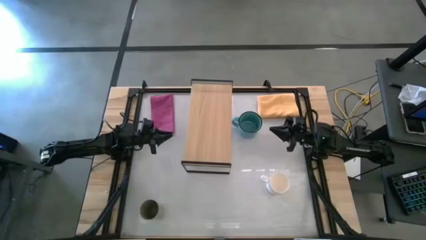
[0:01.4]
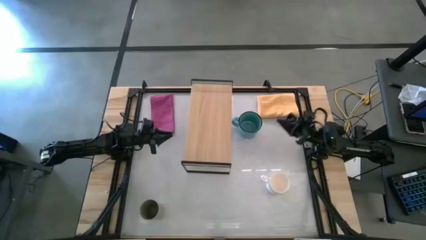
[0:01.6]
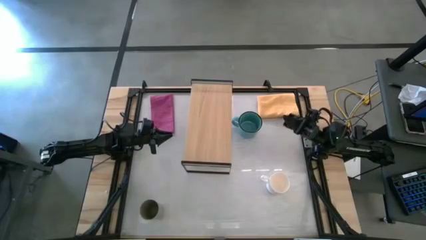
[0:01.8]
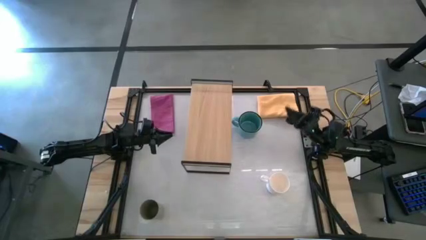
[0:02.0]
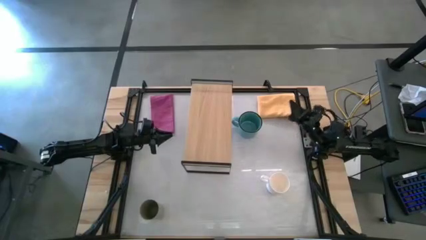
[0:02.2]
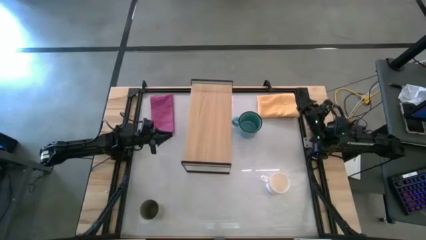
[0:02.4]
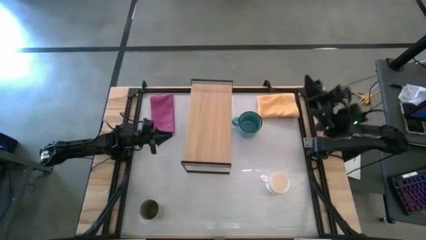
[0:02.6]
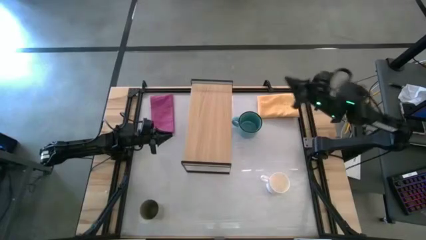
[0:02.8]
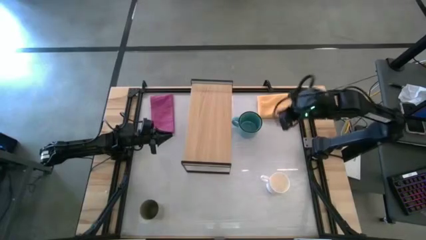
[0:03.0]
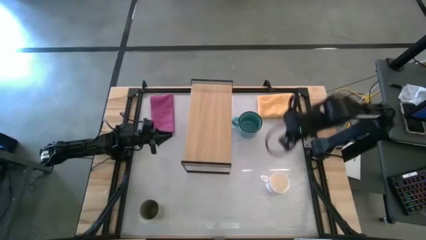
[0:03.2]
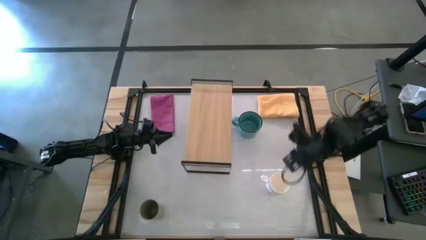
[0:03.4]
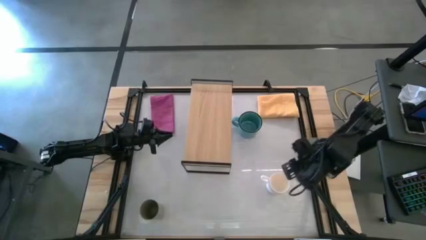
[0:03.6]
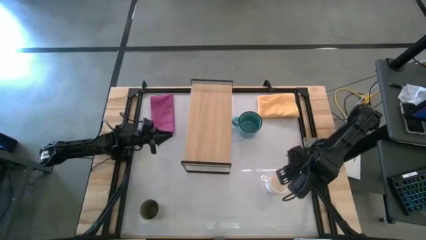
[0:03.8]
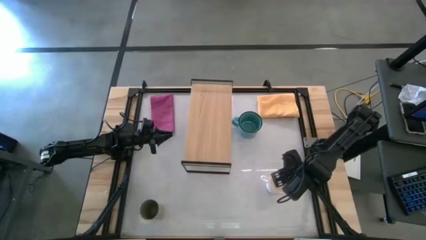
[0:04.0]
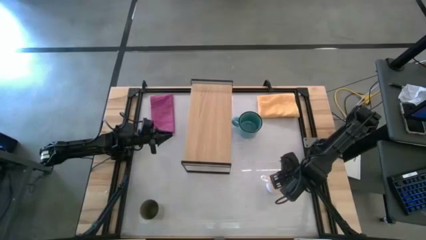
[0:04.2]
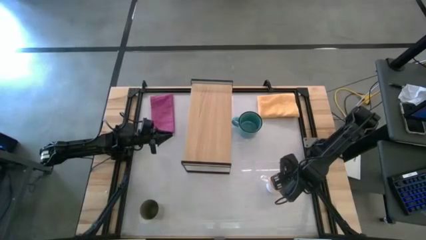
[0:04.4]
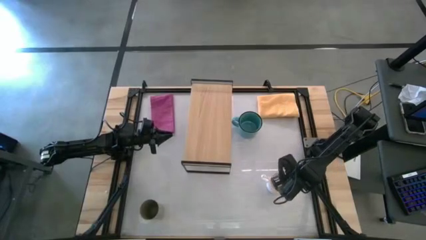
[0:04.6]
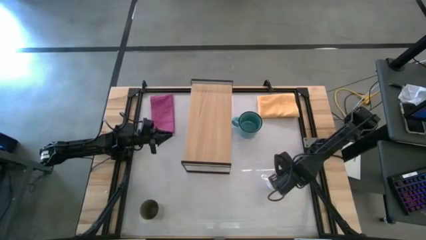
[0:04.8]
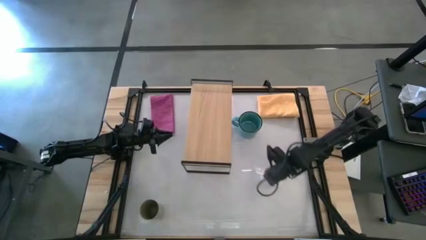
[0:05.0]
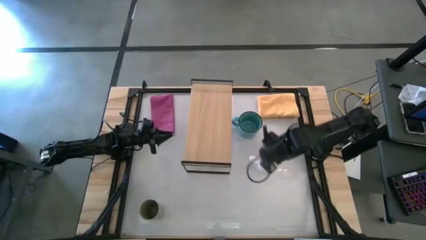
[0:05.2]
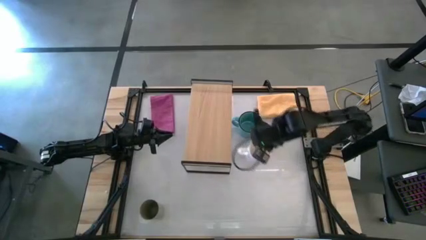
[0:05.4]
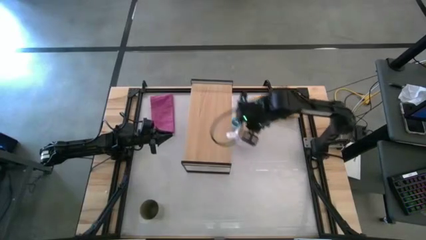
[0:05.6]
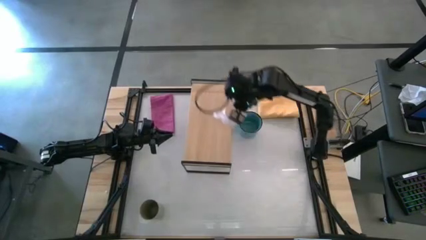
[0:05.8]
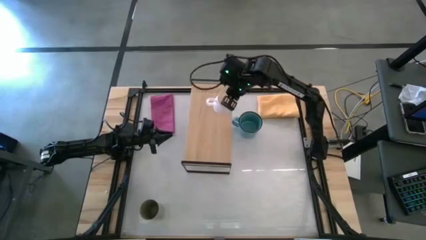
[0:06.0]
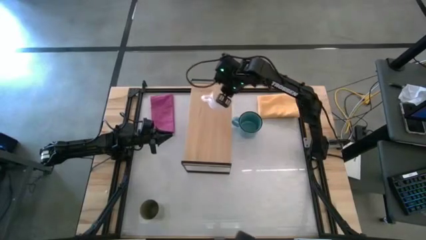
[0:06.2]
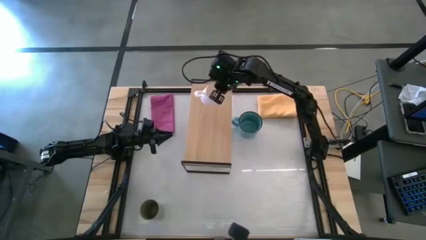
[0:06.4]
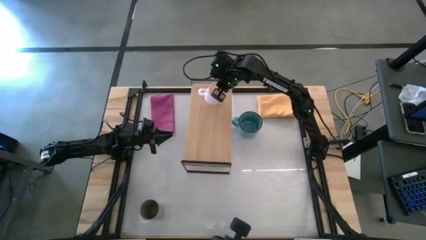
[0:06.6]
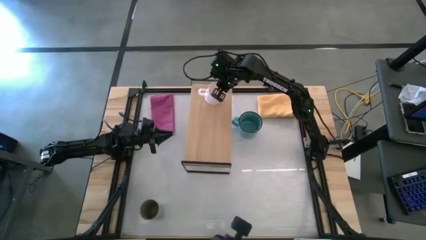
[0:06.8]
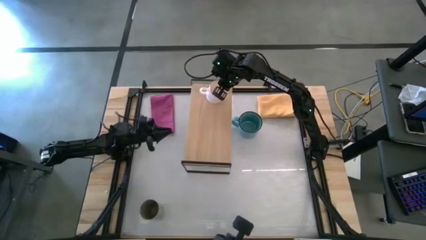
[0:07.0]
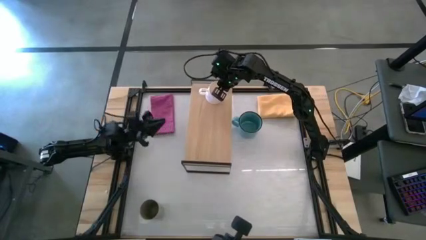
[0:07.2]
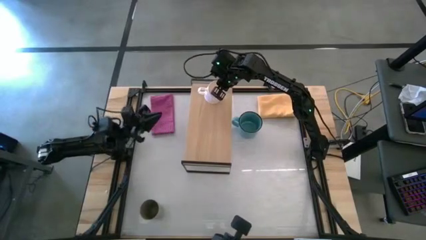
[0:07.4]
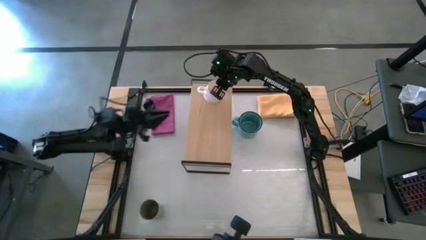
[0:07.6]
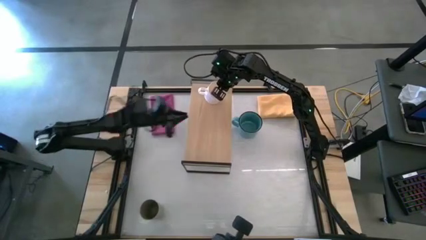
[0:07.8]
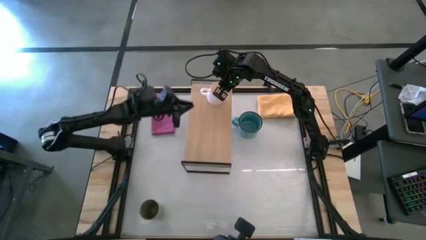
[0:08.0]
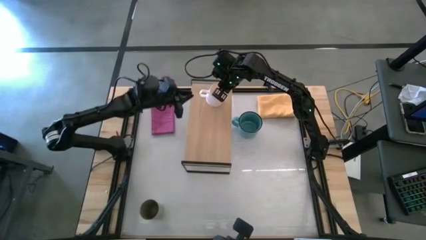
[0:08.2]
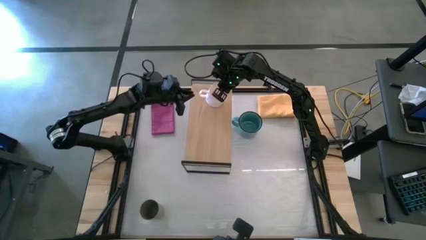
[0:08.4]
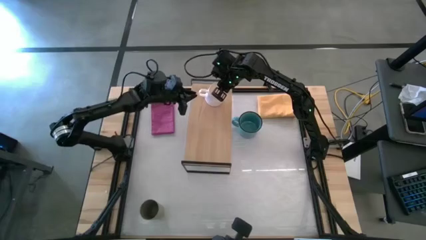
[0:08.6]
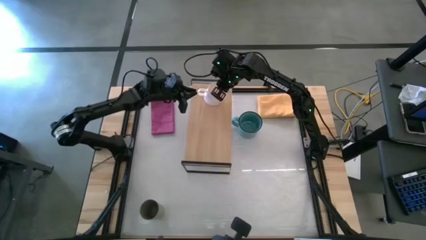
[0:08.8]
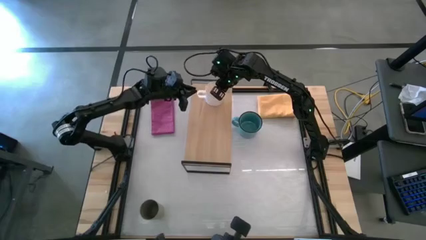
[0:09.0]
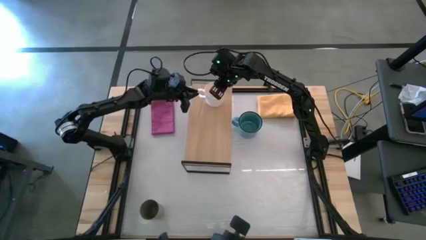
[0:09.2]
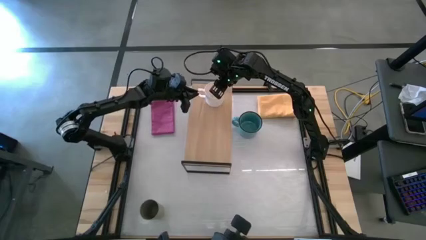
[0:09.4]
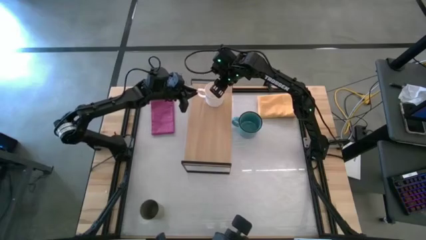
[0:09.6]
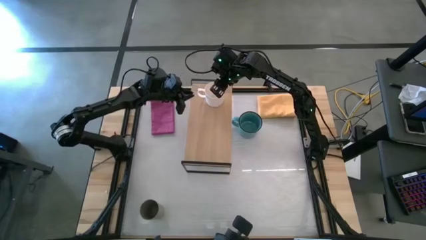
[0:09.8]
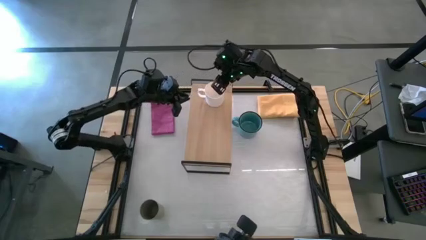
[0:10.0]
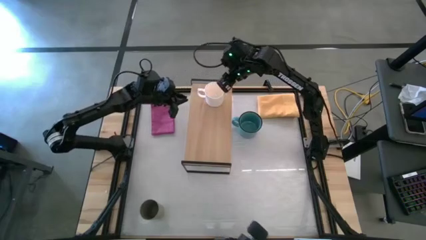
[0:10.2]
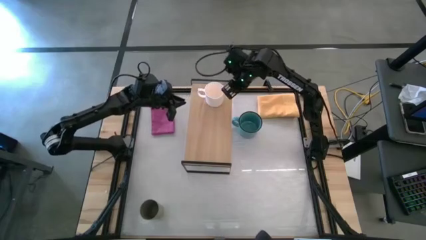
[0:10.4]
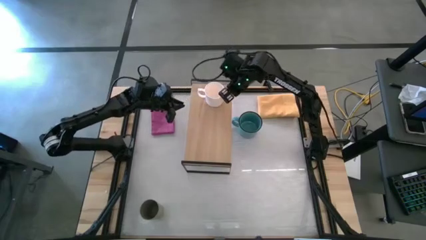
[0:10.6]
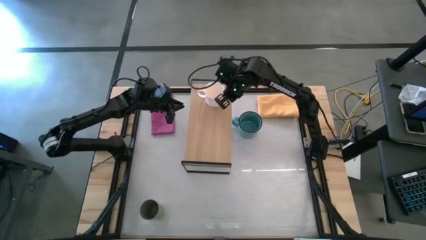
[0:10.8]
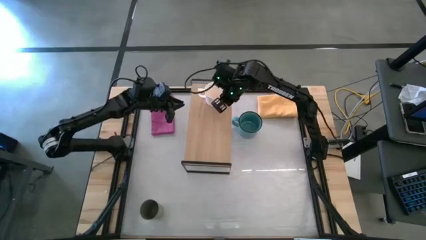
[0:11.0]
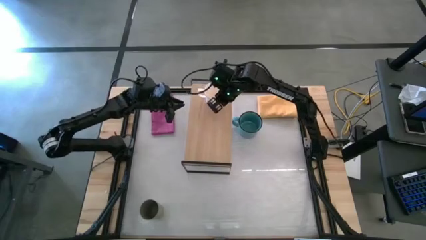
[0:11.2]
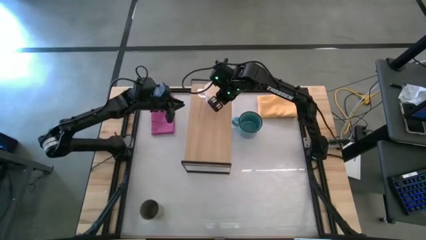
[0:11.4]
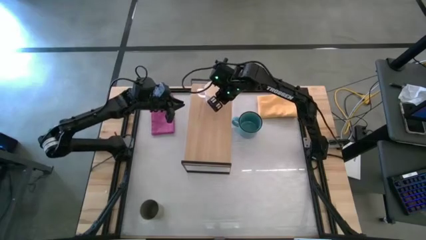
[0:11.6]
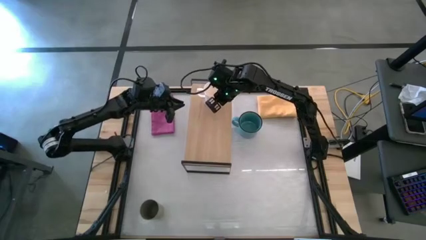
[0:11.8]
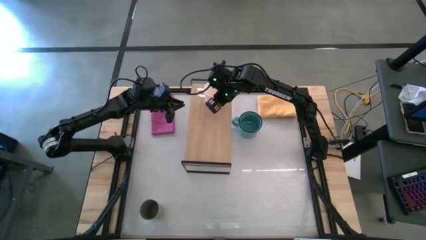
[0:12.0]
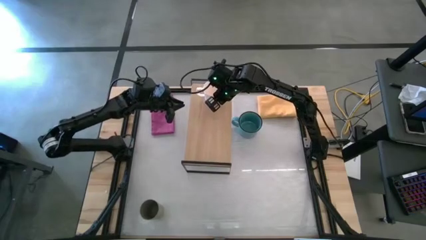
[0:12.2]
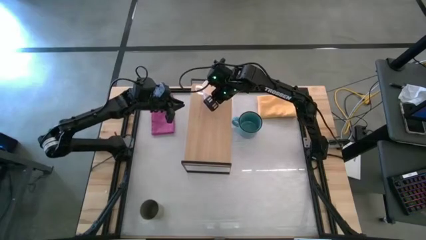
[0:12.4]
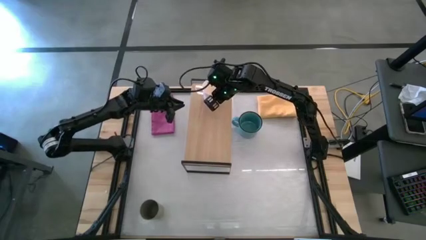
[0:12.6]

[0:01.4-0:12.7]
Task: Stack small to large cups/mugs on shelf
Put the white mug on the shelf

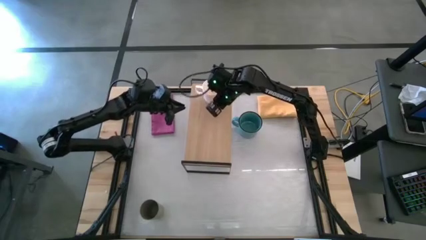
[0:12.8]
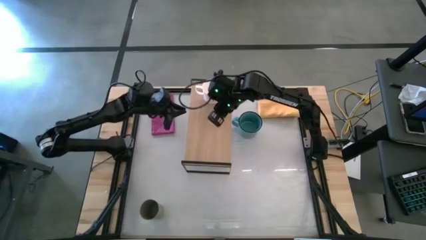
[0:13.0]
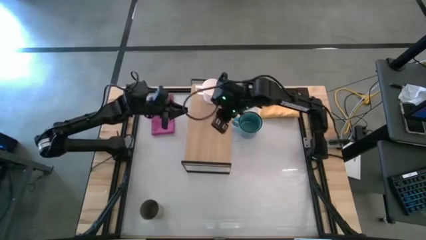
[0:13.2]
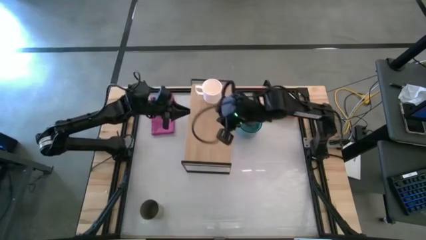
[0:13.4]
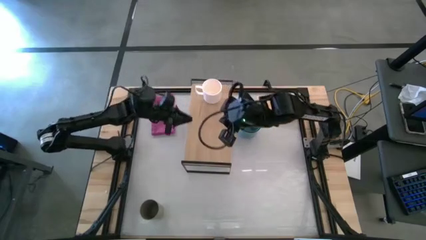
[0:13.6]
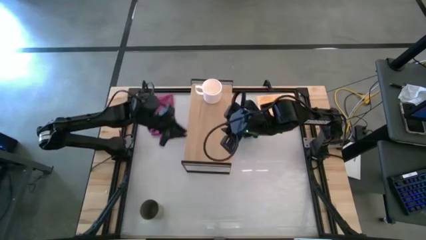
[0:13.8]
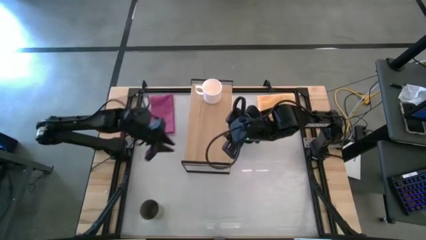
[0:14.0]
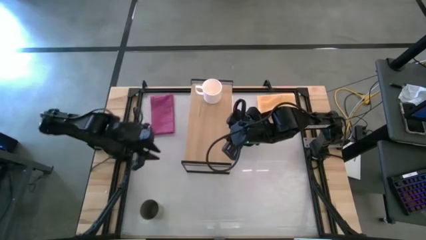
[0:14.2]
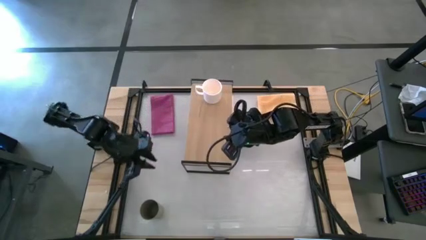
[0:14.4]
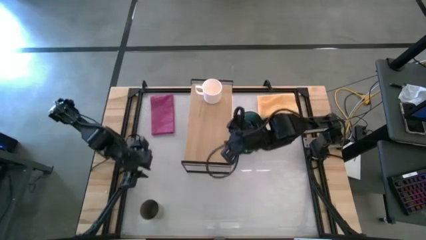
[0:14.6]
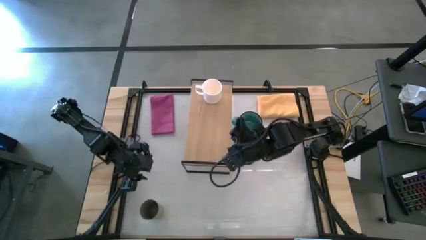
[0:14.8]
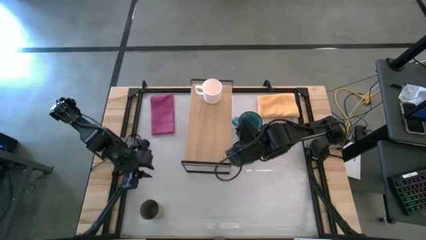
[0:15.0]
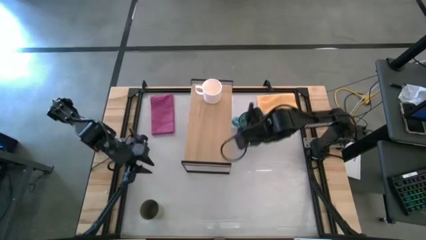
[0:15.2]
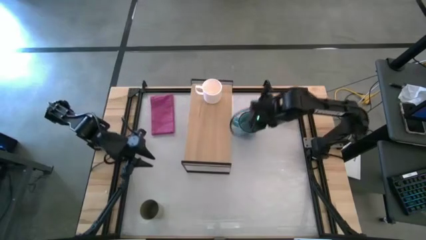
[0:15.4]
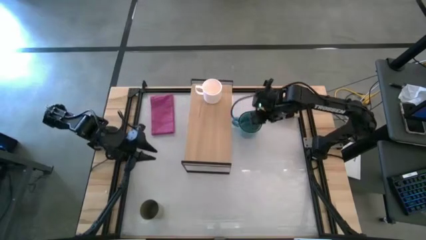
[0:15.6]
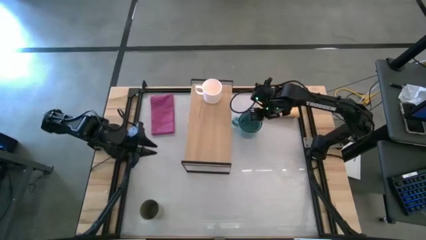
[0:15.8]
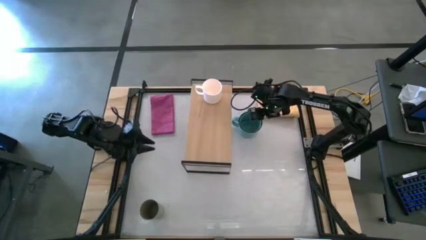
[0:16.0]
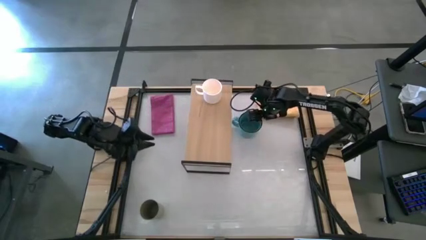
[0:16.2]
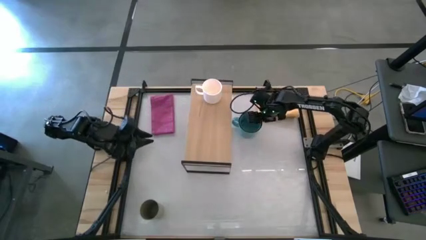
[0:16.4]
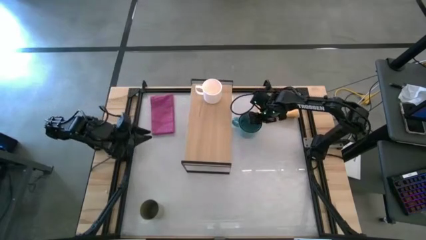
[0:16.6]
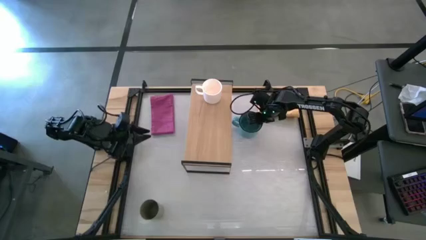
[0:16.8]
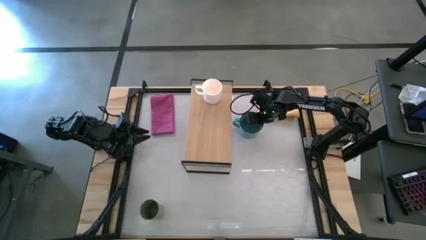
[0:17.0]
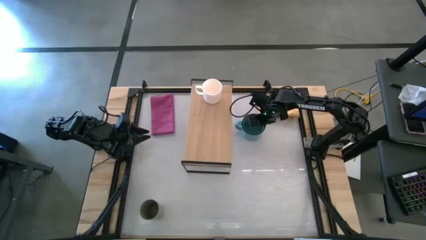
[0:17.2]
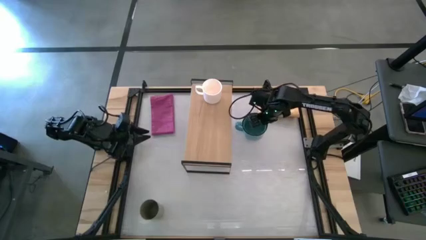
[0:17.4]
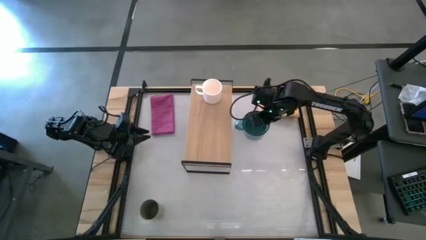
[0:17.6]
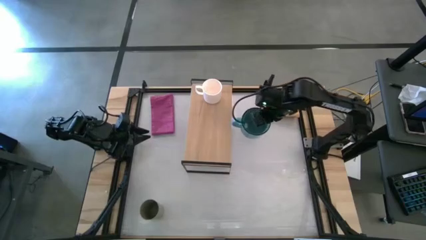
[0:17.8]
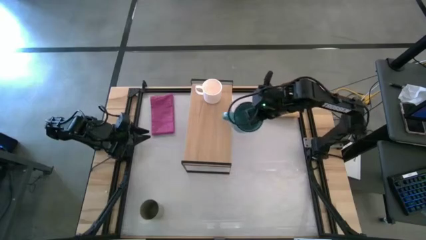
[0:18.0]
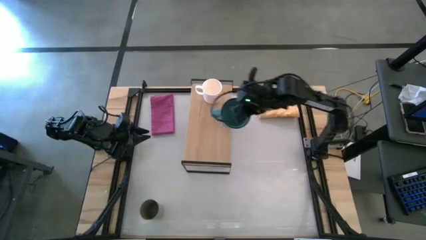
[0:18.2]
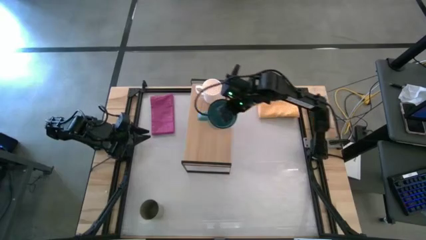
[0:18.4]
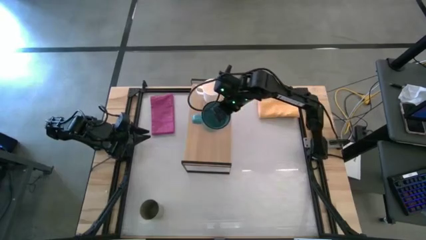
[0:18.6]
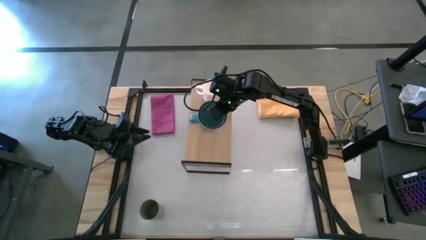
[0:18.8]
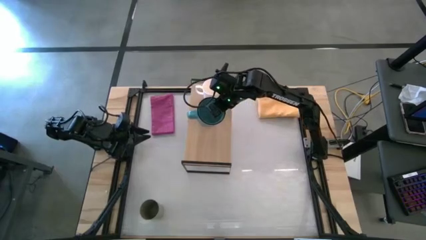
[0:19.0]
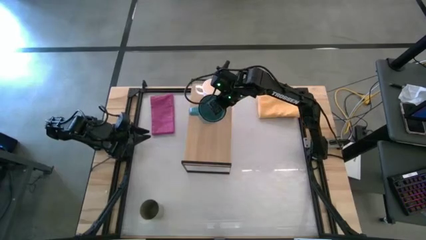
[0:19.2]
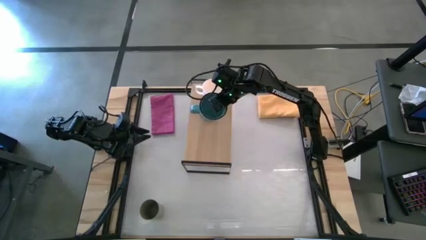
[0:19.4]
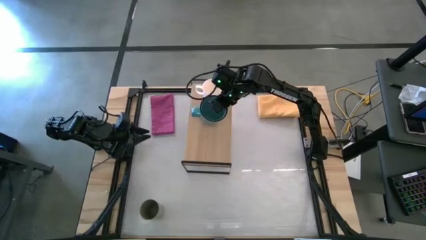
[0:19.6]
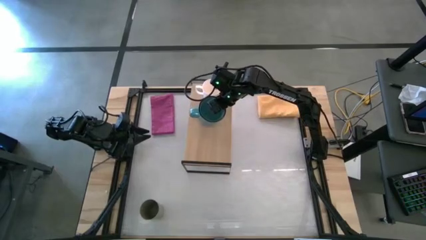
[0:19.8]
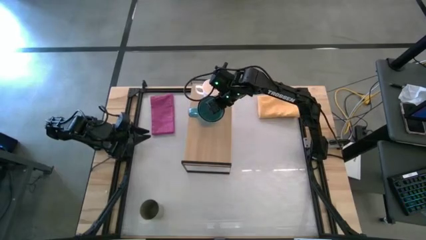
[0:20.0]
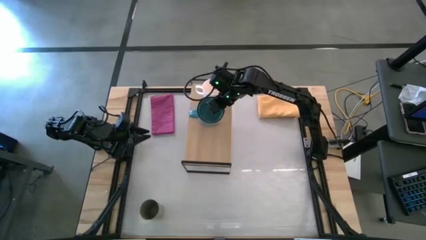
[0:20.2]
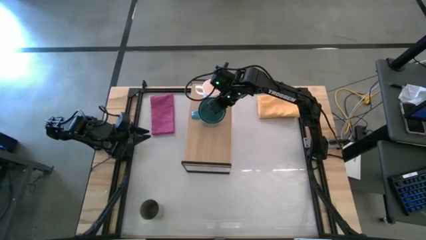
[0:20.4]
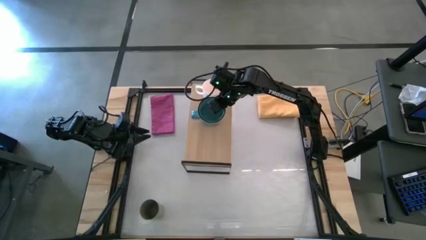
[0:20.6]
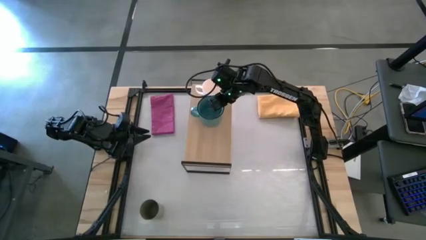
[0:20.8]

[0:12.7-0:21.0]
Put the blue mug on the shelf
